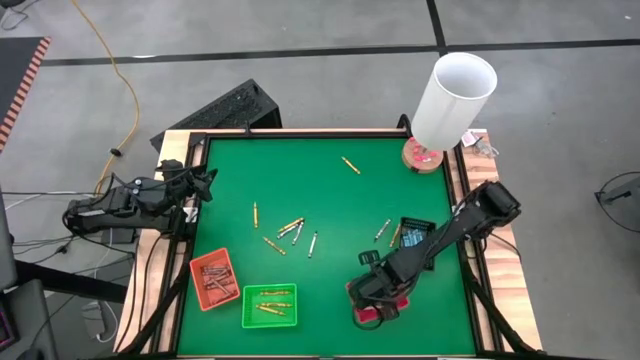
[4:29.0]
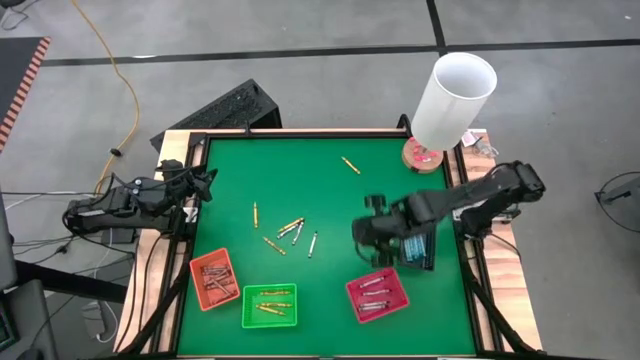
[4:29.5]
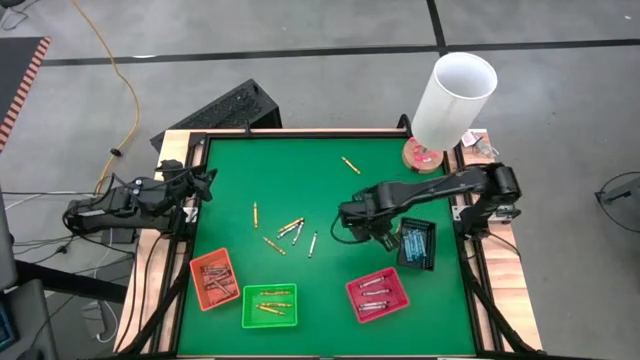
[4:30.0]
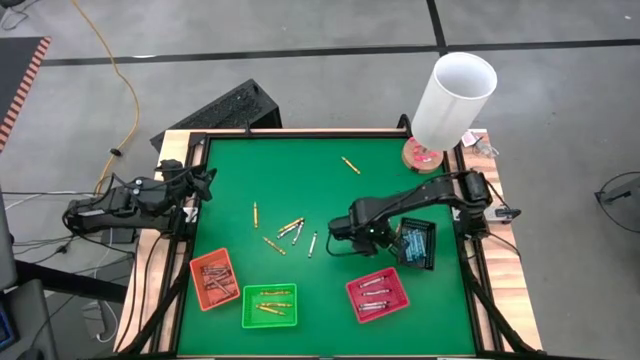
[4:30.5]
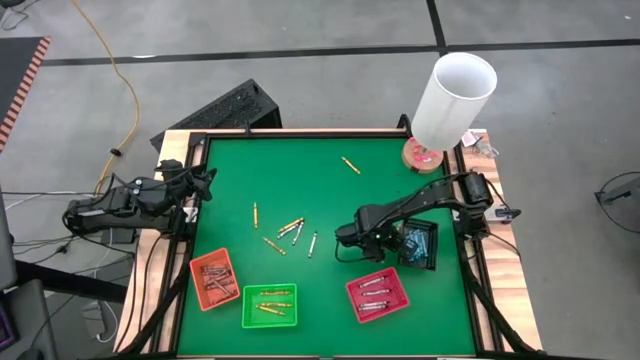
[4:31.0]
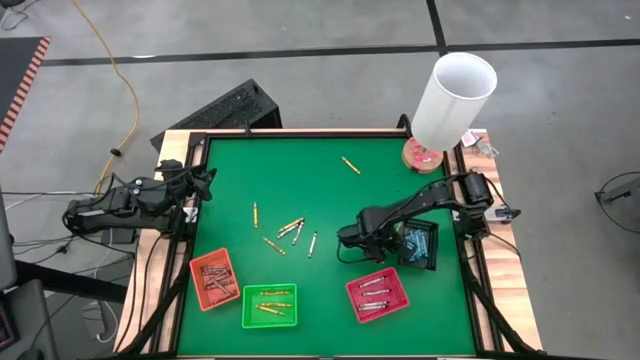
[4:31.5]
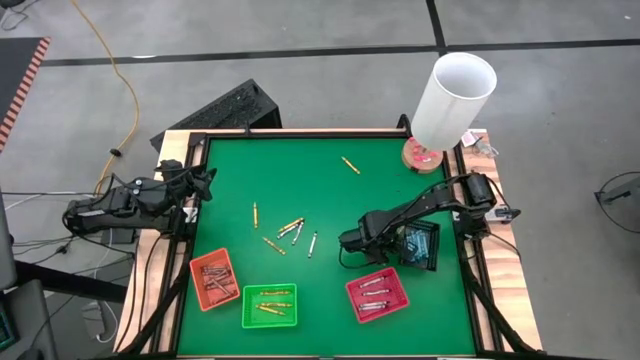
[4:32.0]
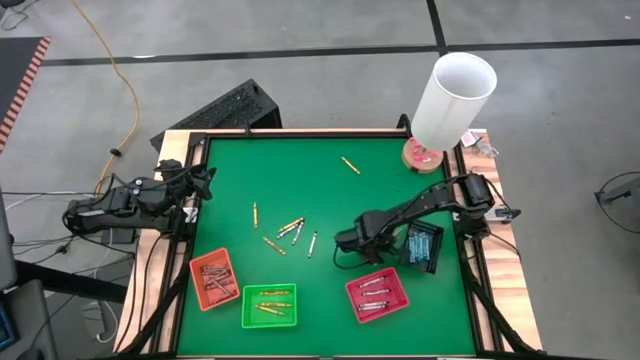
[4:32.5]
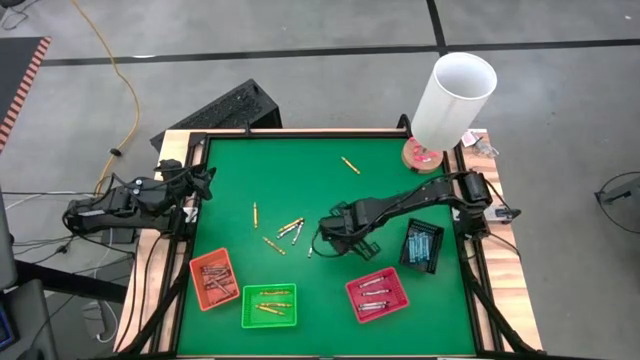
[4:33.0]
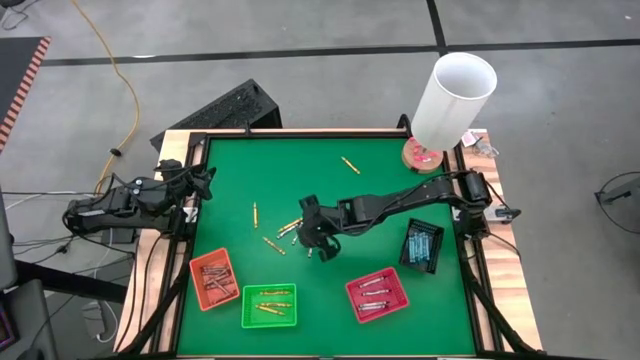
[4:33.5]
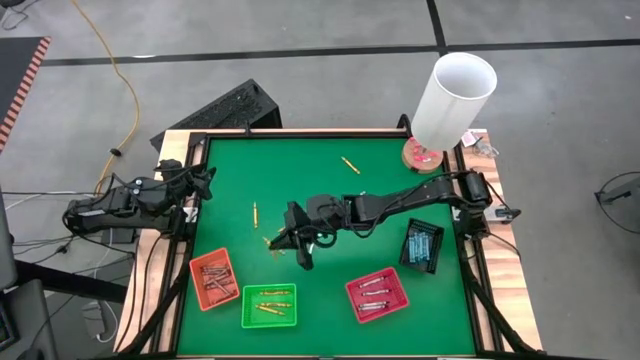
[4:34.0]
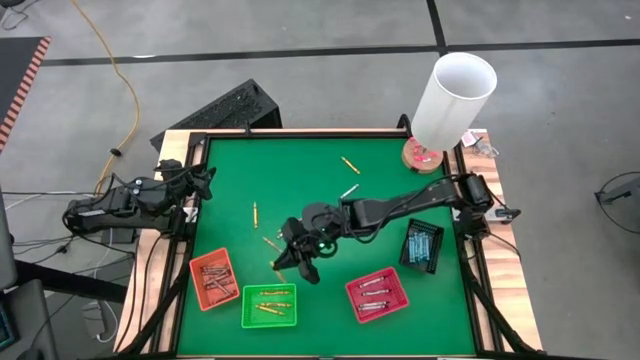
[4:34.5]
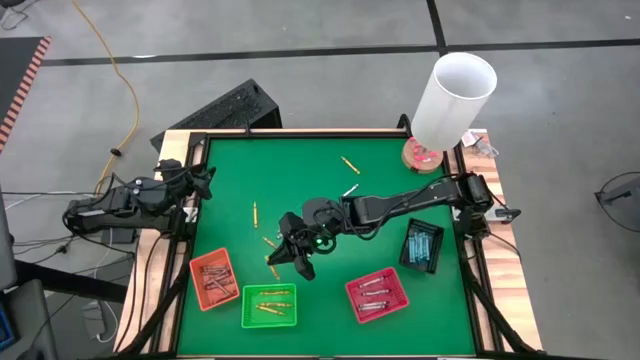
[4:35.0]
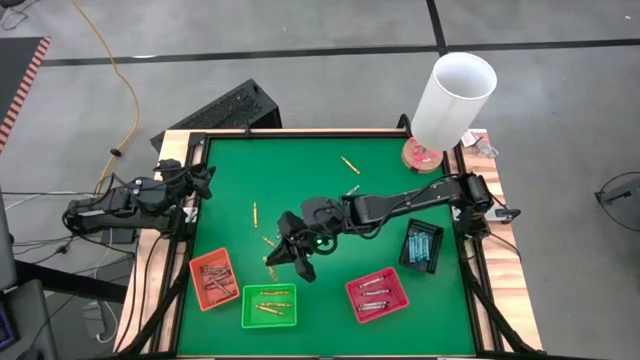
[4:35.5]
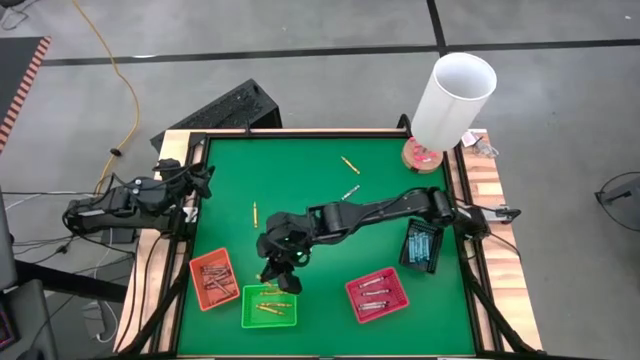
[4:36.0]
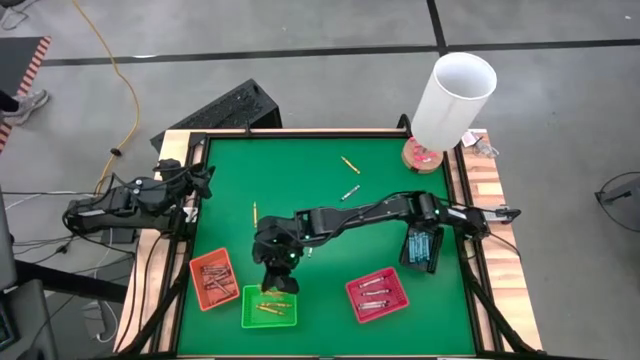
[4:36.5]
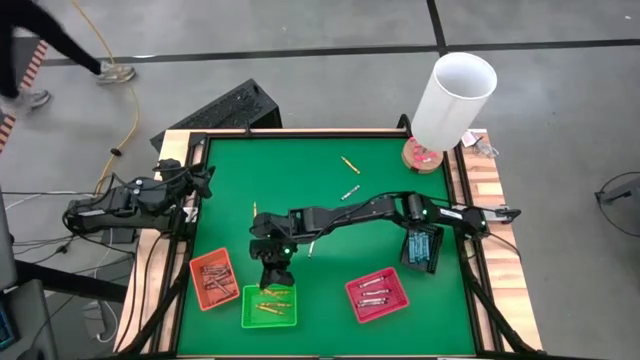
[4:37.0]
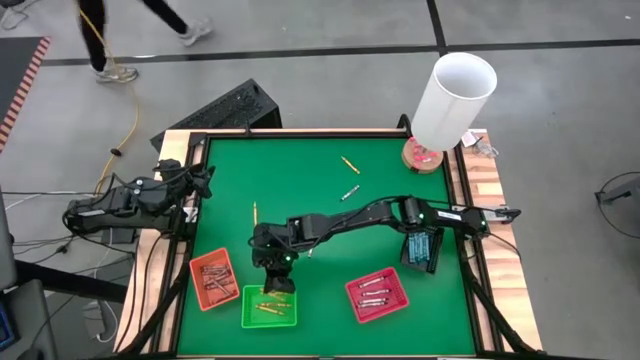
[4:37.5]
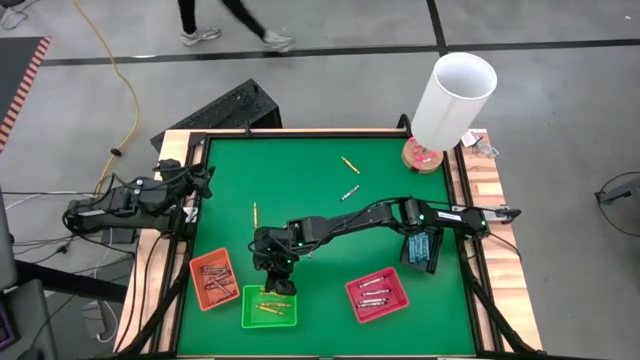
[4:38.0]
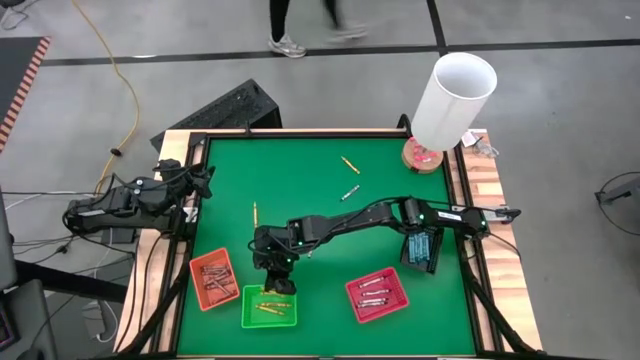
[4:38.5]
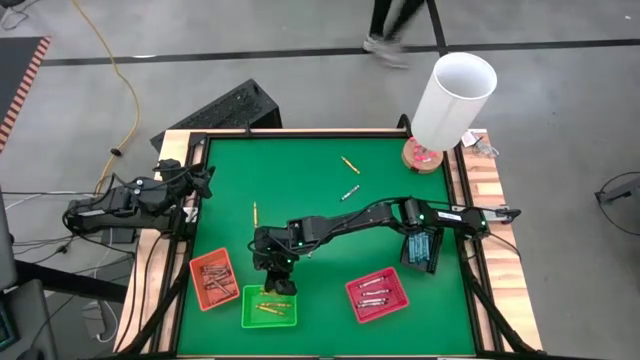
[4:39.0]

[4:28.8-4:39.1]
Task: Sort crayons
Put the yellow crayon into the green bin

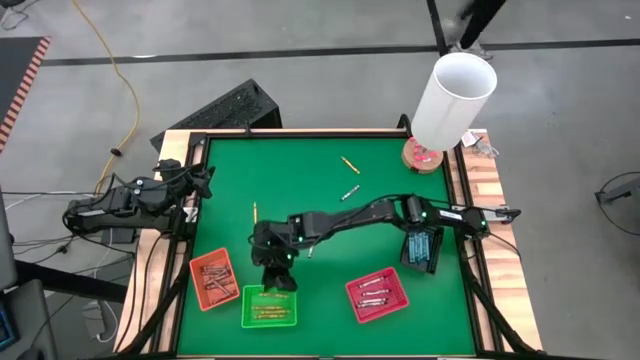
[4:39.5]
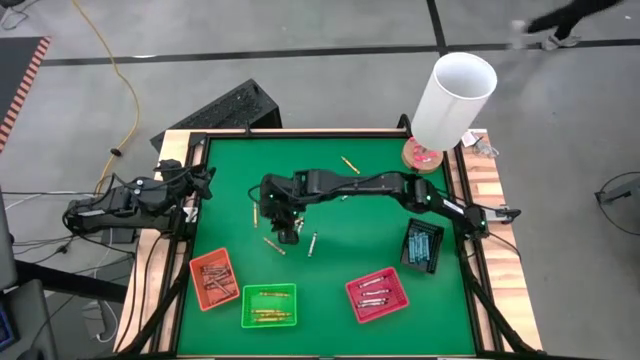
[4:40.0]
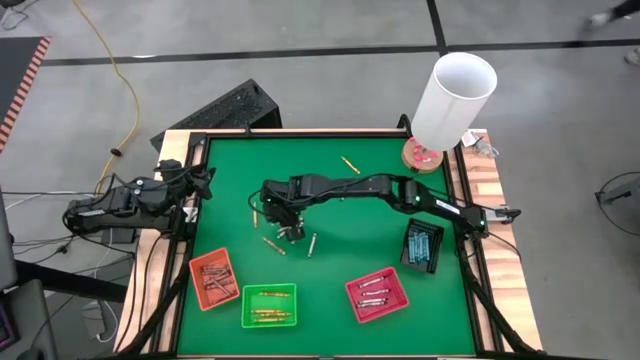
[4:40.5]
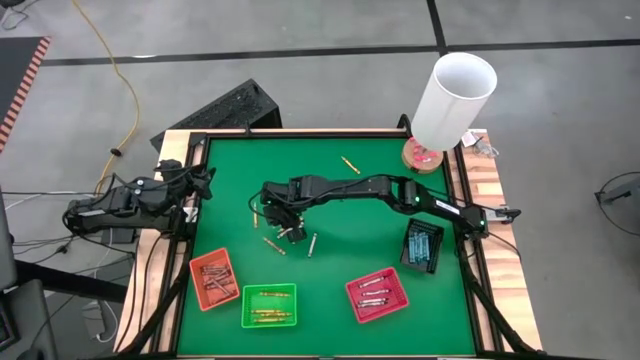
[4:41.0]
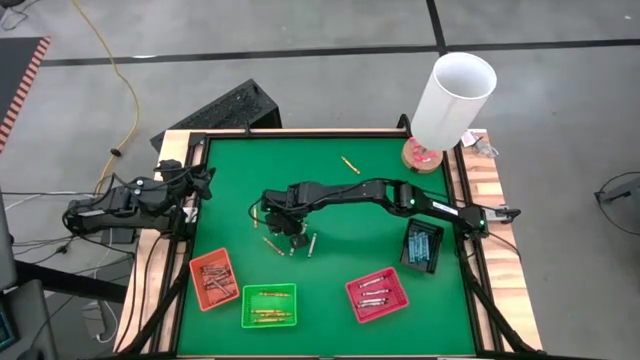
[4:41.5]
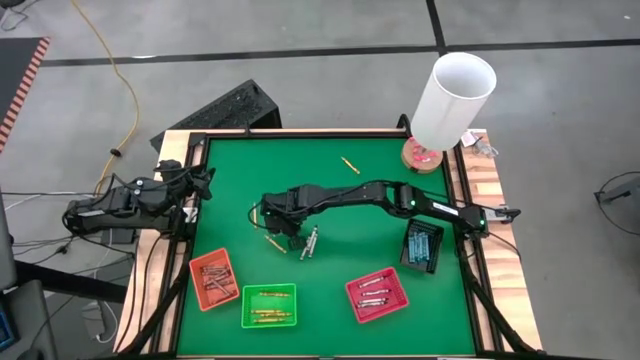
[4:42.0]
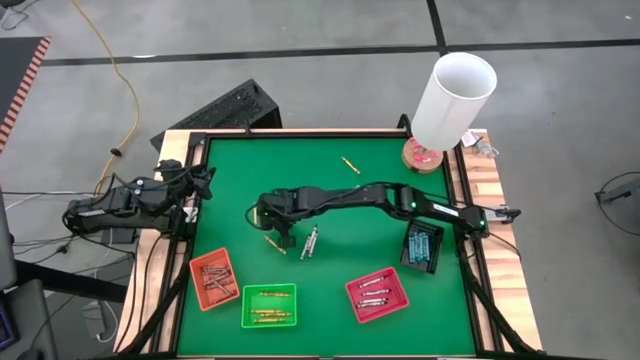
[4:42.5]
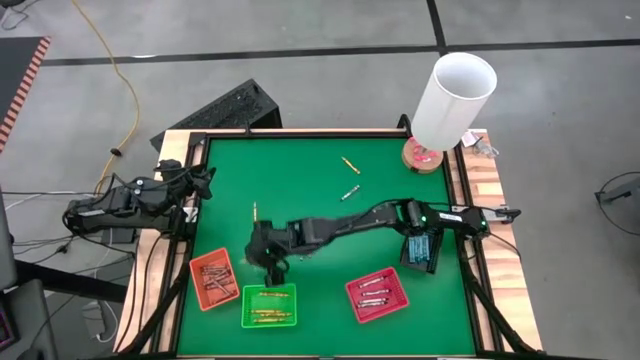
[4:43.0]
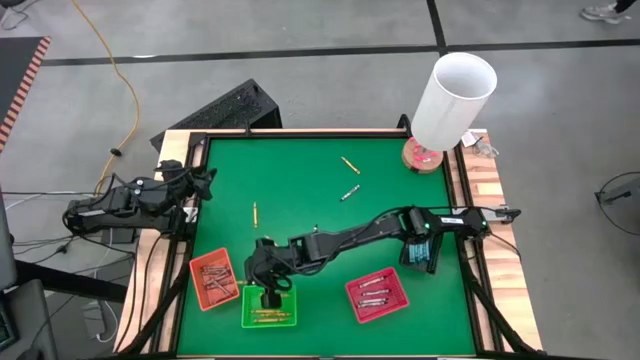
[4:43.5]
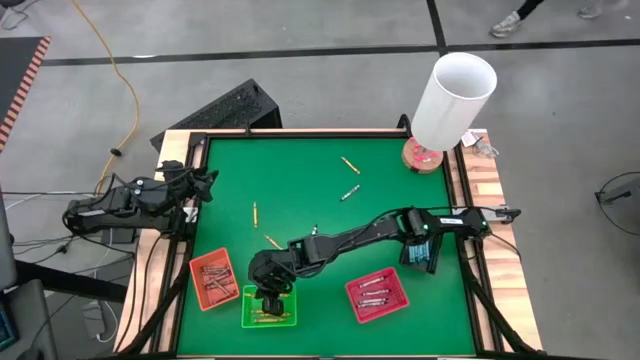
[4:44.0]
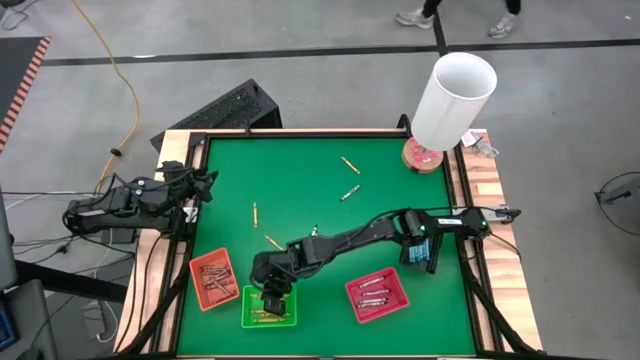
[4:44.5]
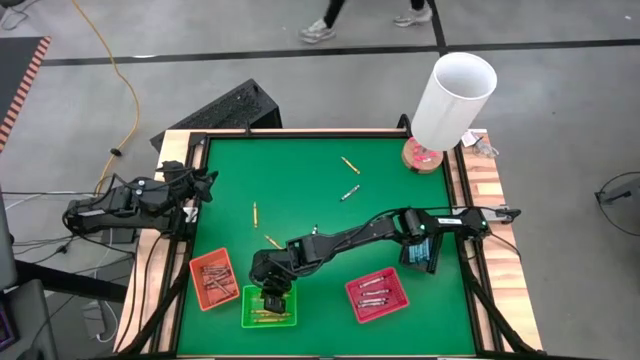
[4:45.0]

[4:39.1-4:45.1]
Put the yellow crayon into the green bin

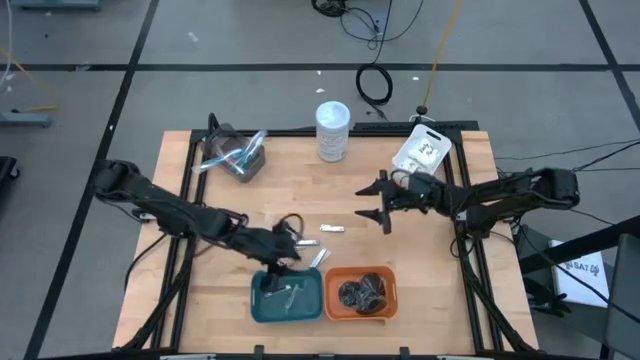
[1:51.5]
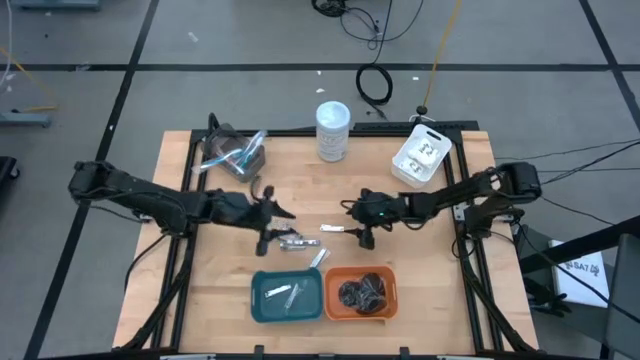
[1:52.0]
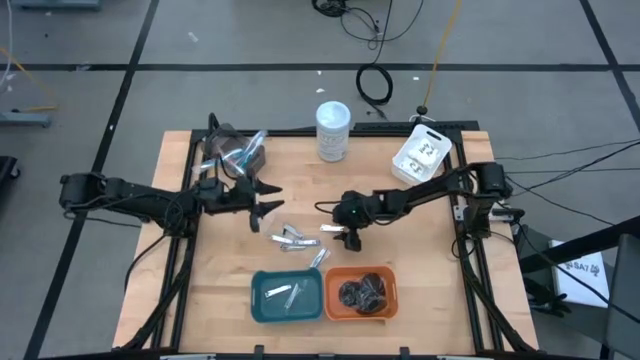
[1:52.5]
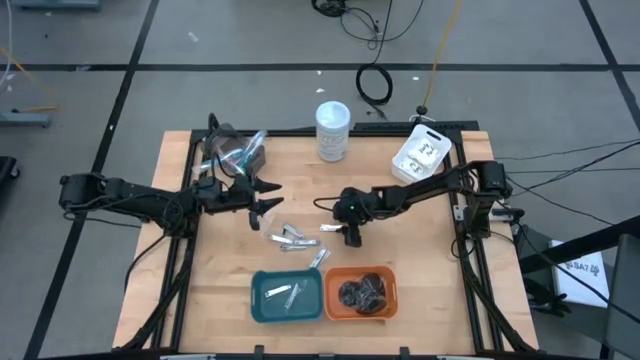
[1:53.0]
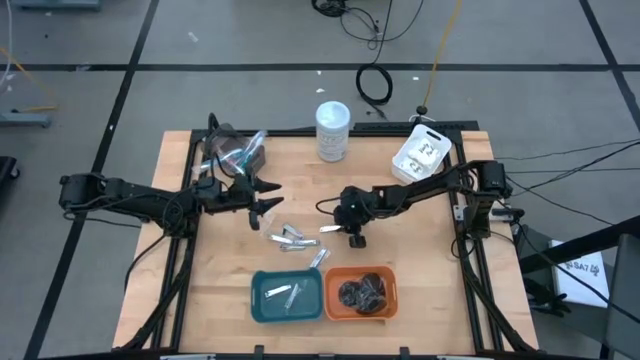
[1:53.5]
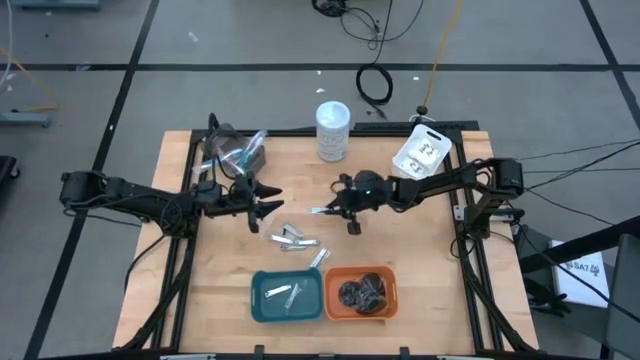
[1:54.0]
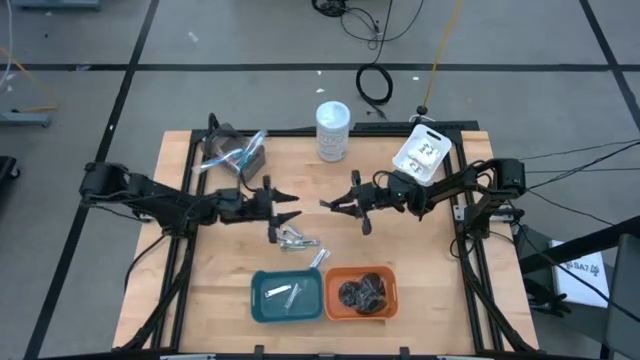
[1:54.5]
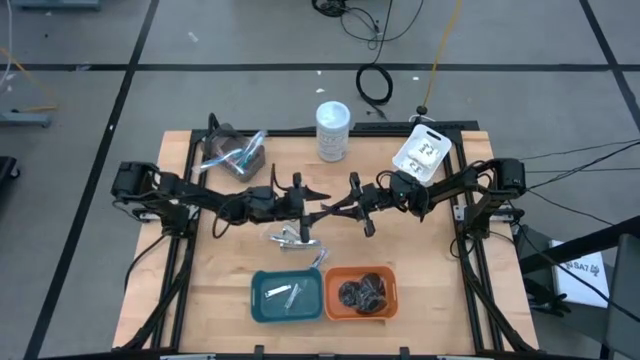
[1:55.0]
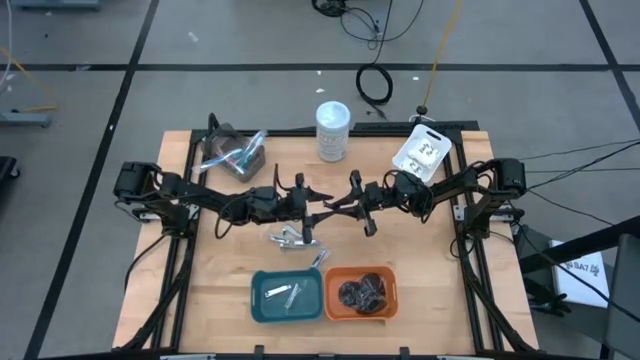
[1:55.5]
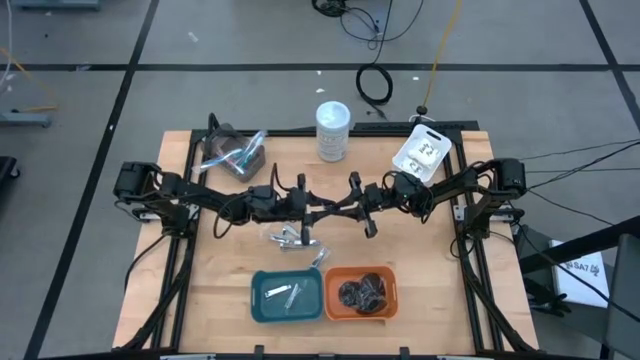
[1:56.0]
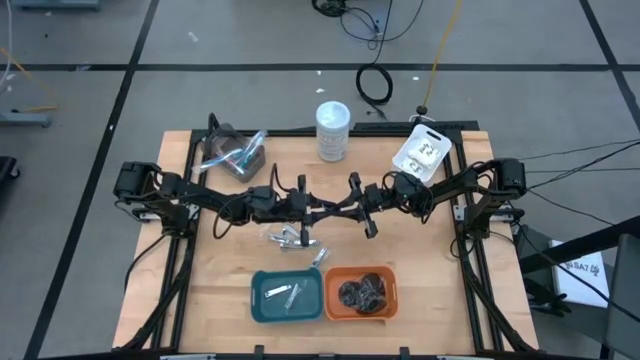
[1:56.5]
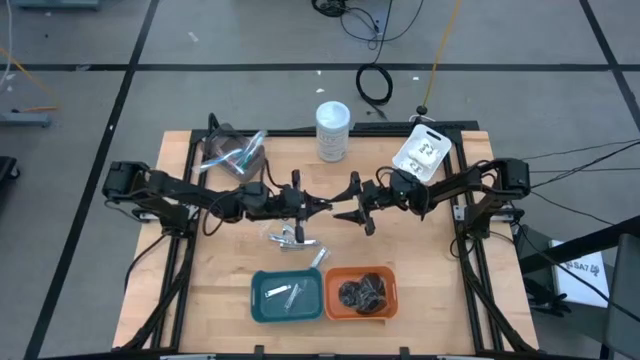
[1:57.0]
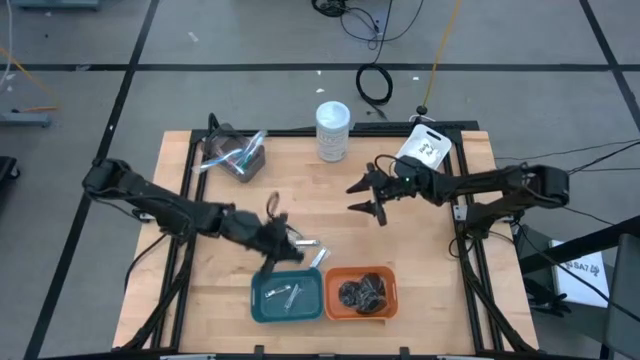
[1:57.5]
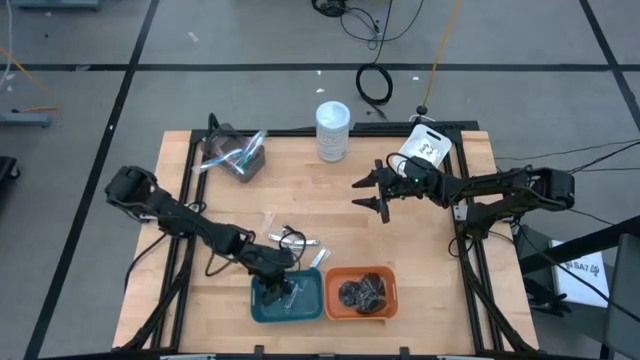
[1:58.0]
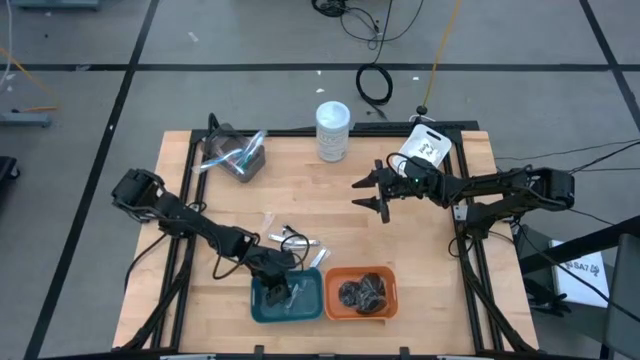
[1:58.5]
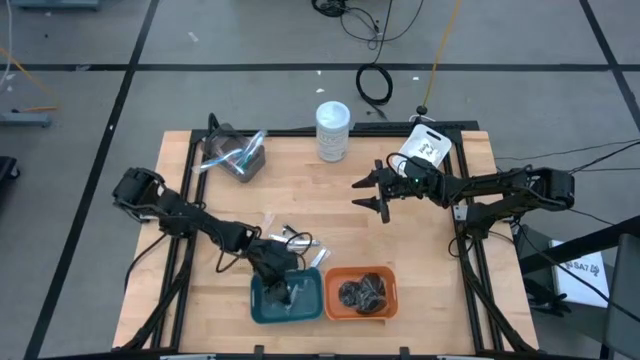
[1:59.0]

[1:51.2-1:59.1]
Task: Pick & Place Travel size toiletries
Put the silver nail cutter into the green bin
